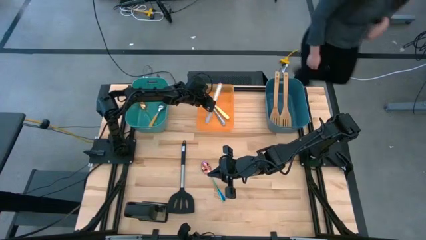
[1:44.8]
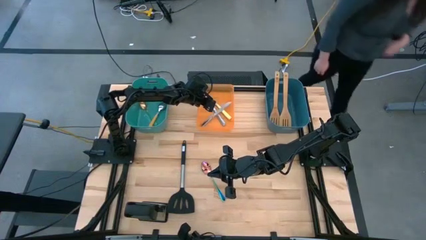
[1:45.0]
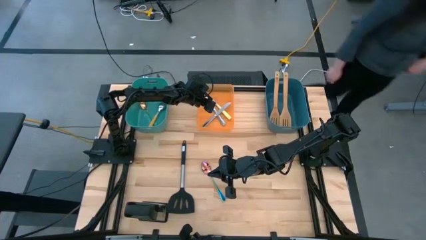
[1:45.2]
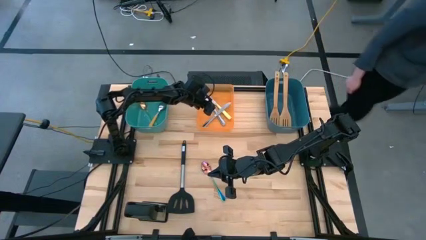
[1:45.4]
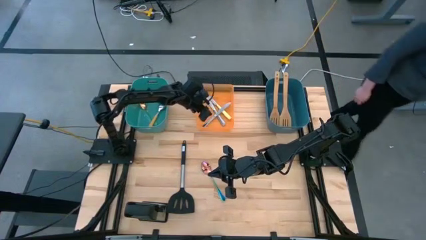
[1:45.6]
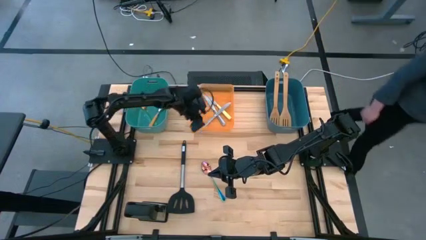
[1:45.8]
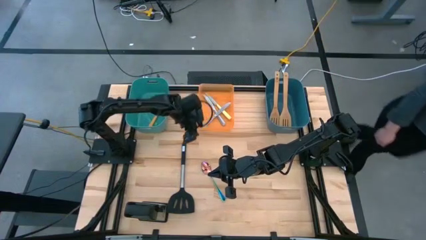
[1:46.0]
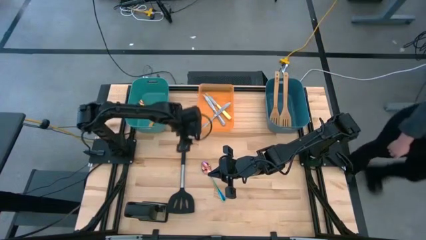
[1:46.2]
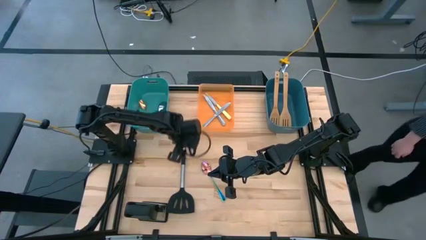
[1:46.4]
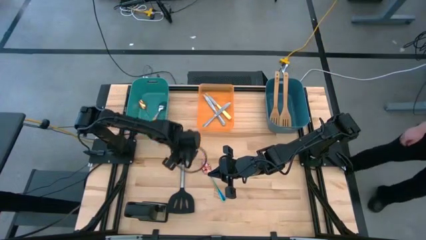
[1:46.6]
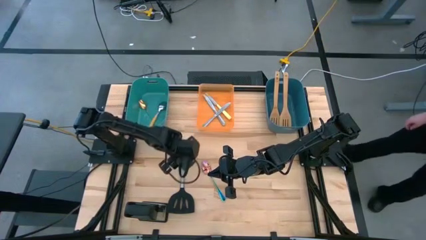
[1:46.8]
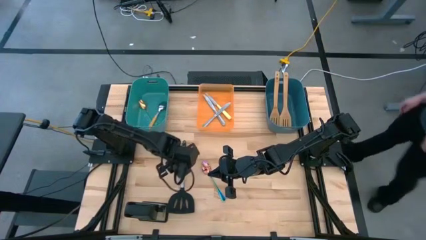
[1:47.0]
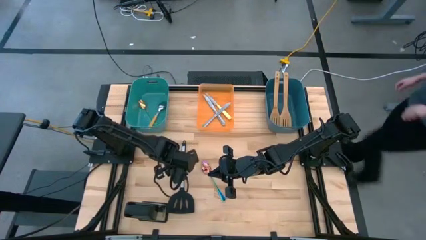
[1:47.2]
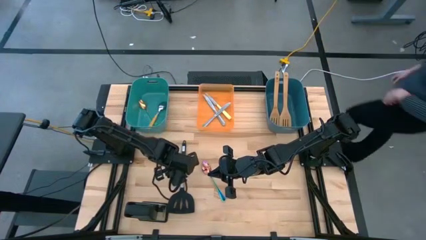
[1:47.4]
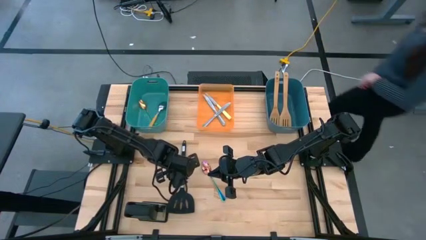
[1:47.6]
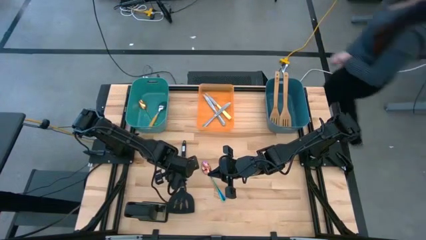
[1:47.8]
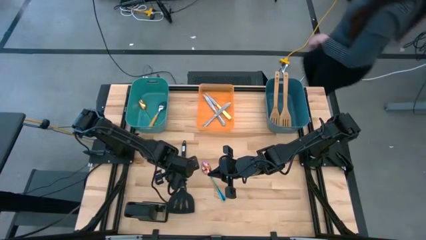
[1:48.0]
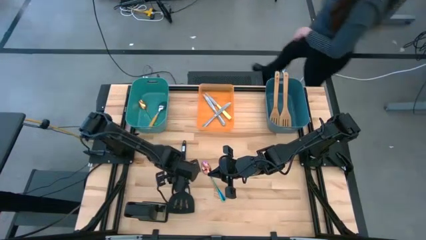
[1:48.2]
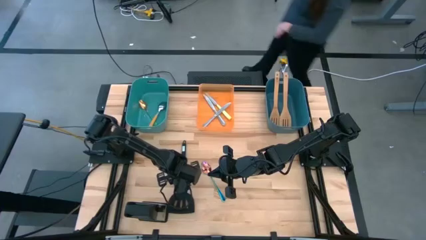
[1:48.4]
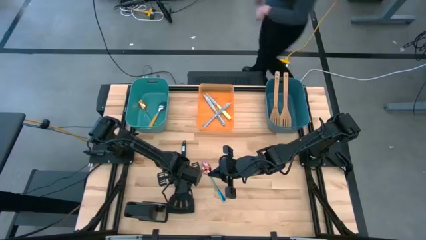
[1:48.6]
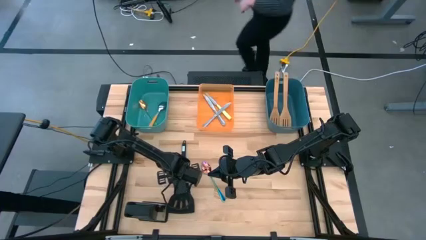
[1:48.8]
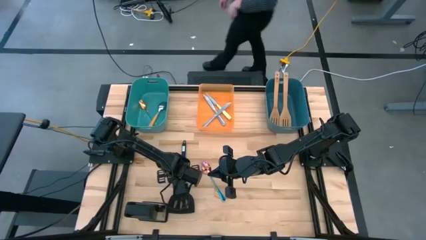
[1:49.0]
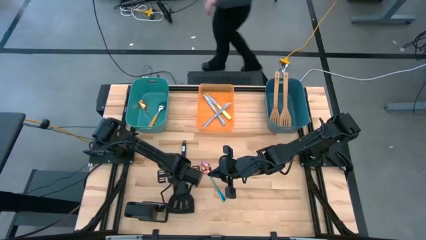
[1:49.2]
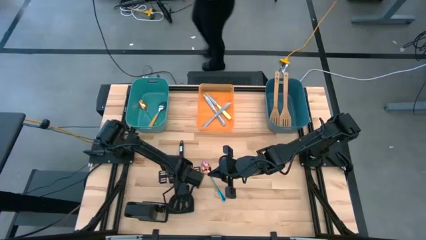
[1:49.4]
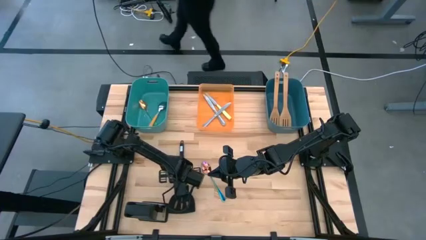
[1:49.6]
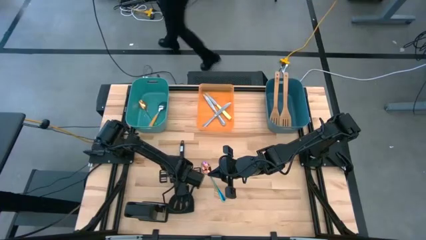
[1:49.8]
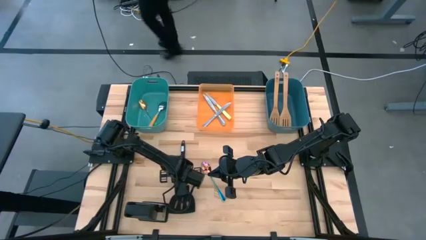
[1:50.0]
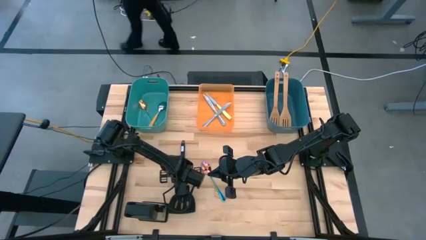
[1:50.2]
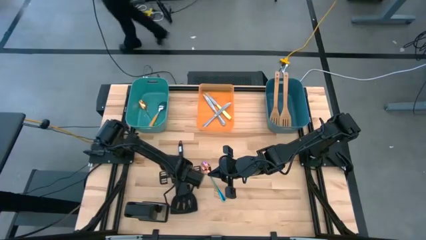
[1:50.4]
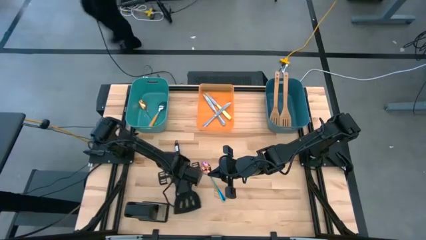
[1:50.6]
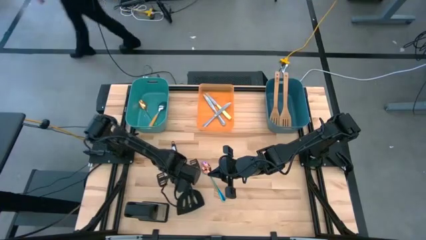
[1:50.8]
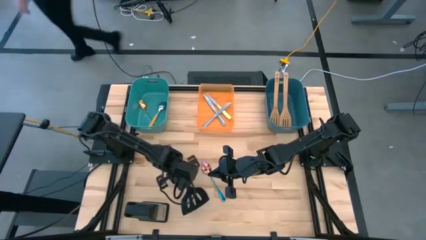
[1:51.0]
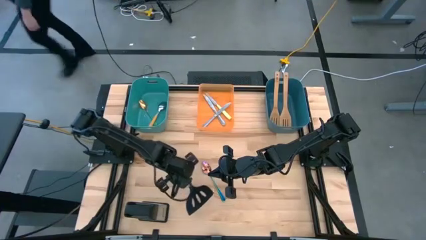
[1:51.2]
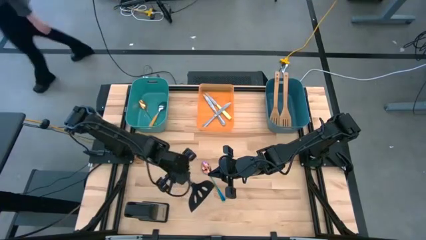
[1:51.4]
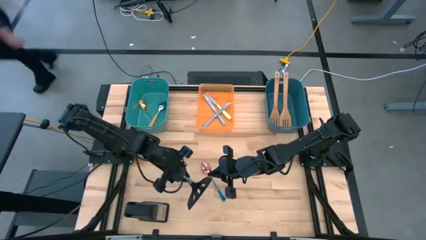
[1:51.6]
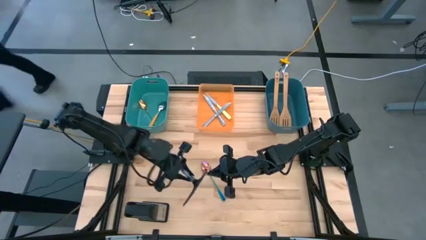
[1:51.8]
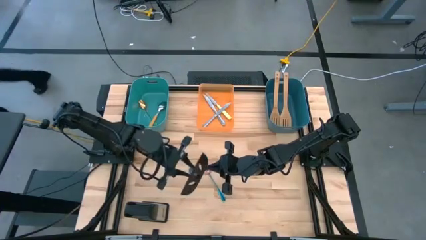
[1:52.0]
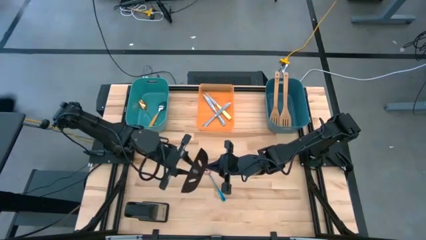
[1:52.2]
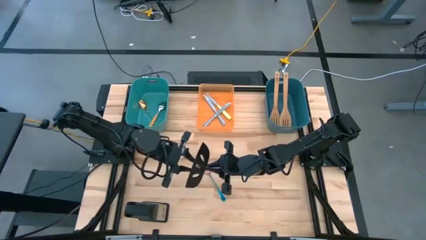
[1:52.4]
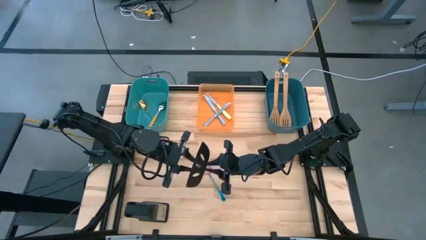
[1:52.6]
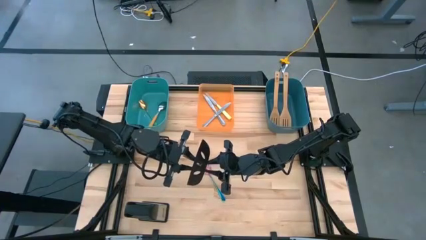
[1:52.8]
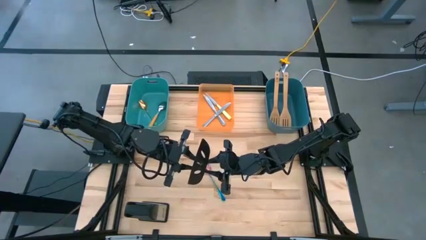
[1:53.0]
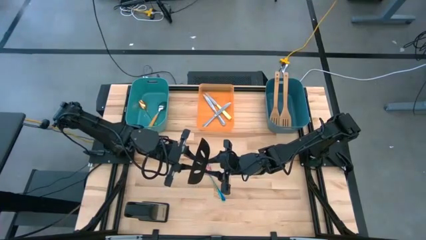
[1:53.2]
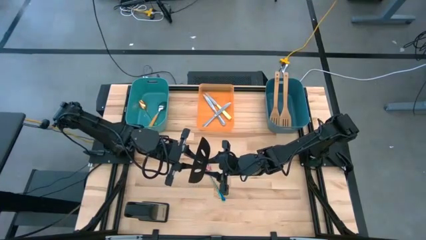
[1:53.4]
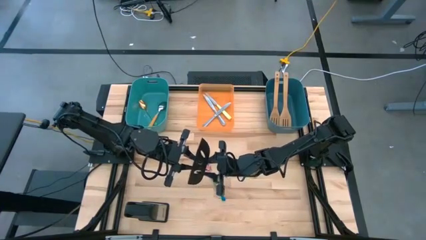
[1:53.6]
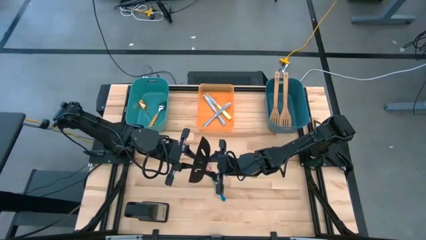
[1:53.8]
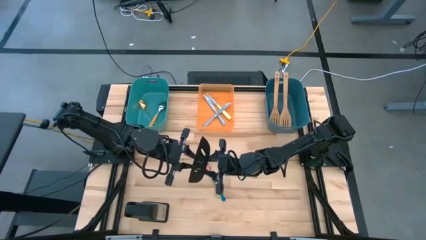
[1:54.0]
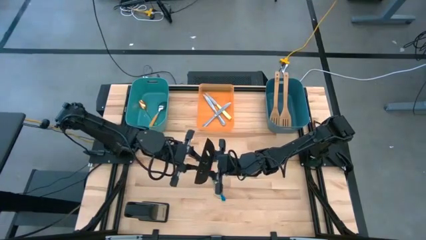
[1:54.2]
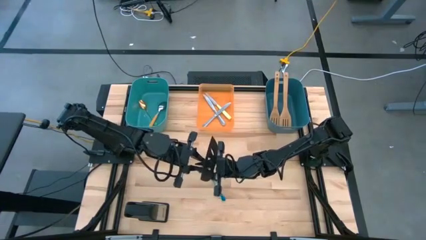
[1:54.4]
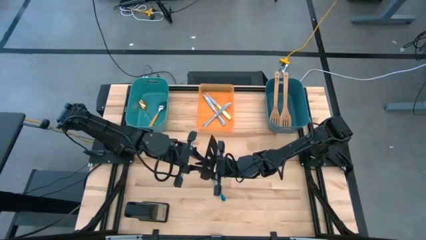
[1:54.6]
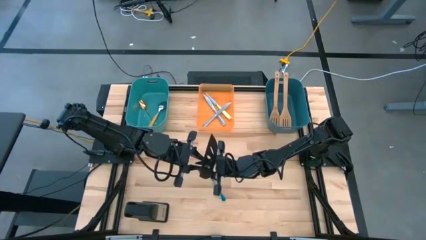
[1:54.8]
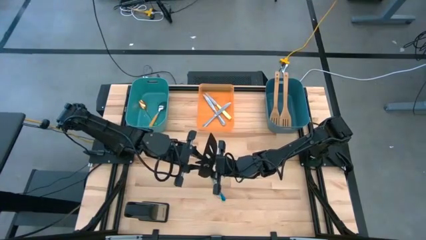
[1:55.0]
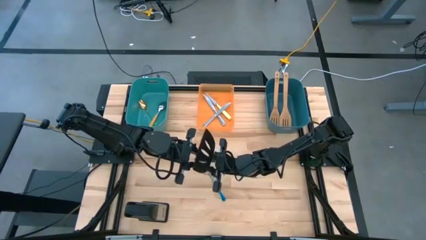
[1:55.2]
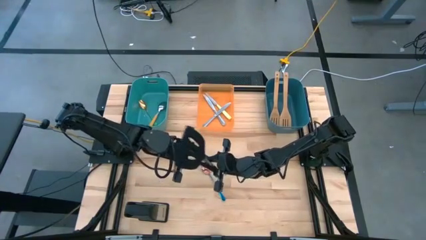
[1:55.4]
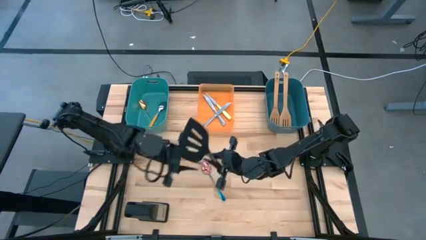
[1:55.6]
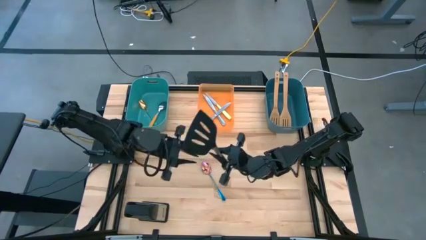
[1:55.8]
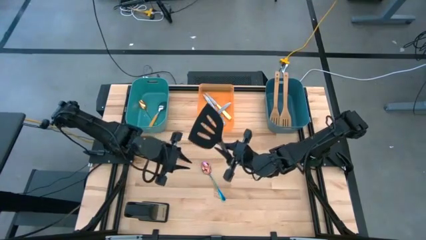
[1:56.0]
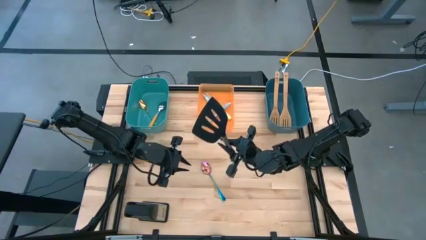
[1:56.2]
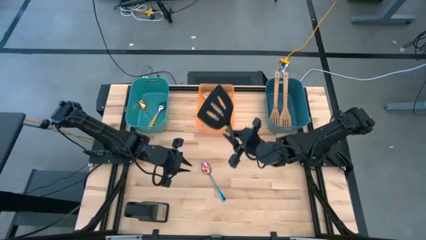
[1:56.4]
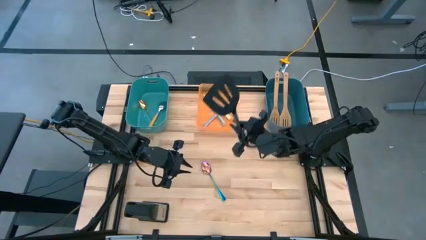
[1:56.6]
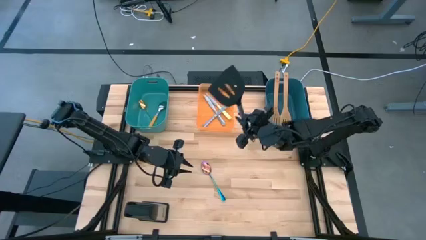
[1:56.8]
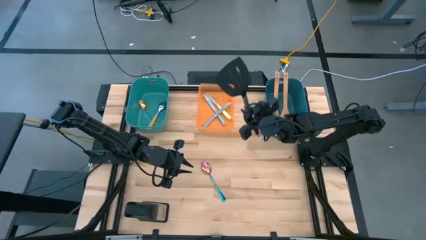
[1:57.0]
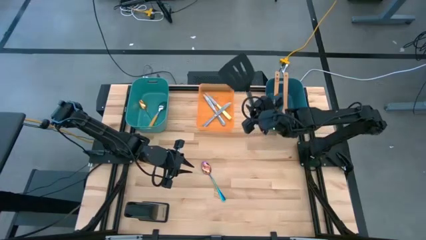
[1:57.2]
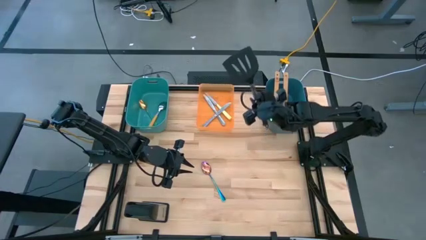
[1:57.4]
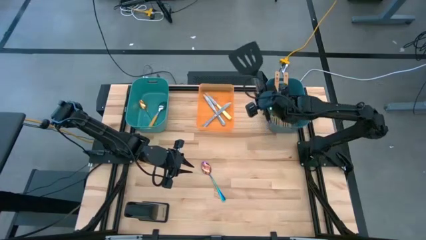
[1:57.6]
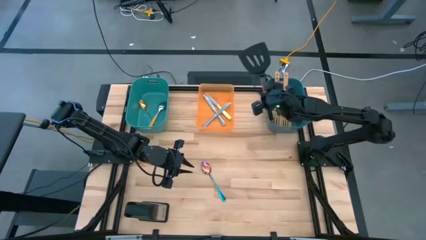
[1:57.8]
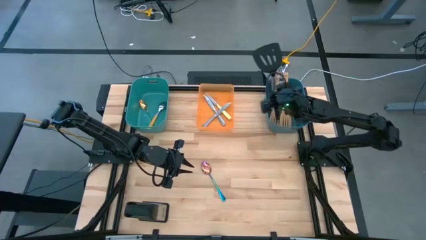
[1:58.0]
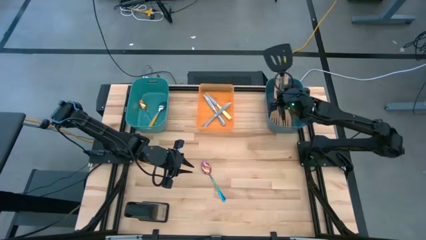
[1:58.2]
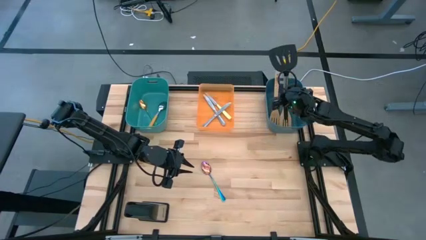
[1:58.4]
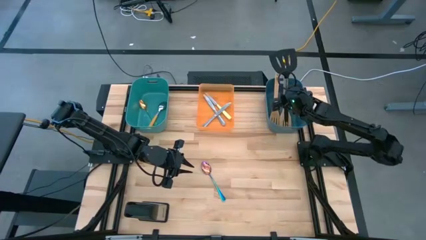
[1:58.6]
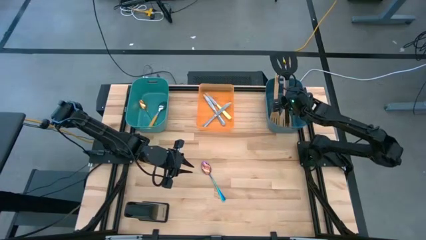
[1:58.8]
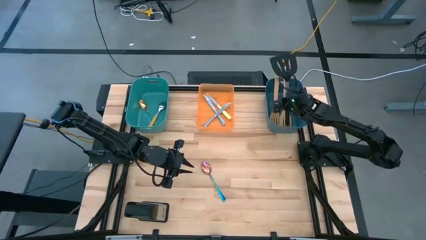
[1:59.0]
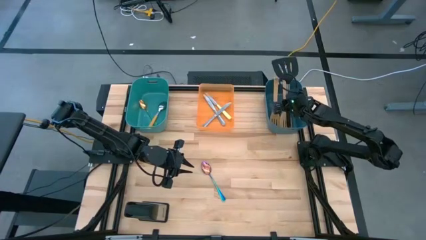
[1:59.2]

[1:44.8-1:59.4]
Task: Pick & Place Kitchen Items
Put the black spatula into the blue bin
